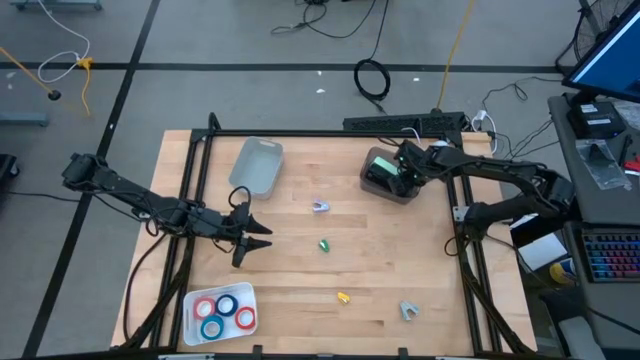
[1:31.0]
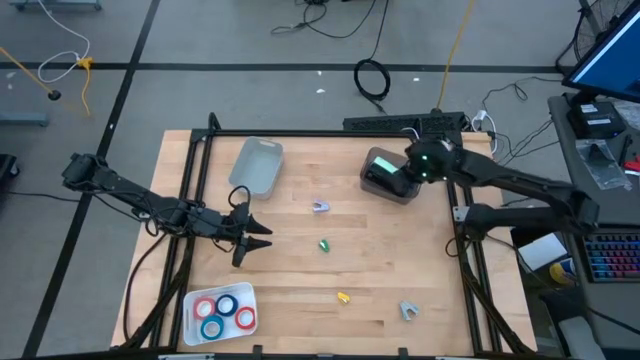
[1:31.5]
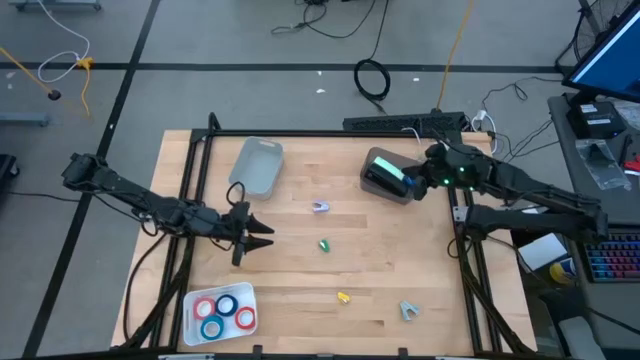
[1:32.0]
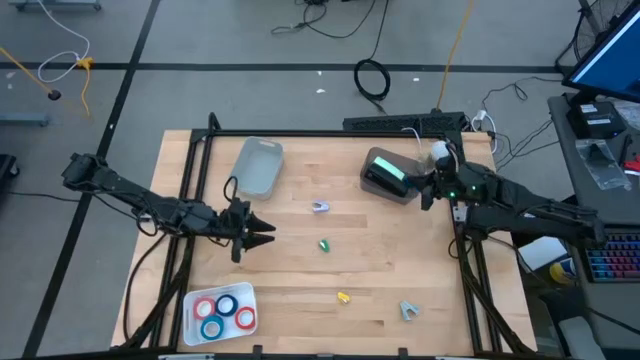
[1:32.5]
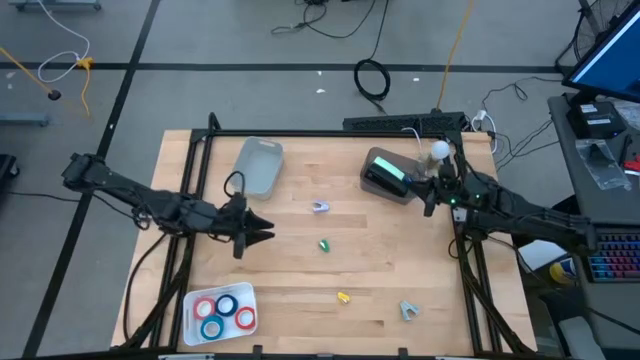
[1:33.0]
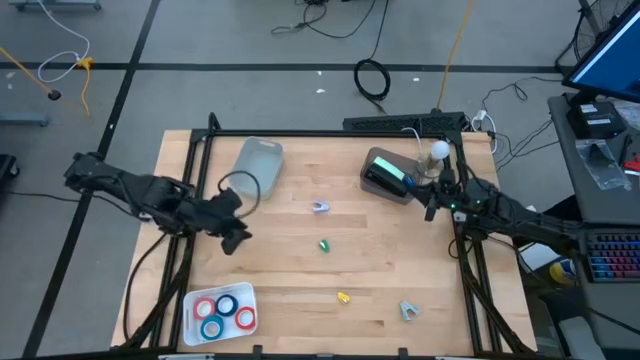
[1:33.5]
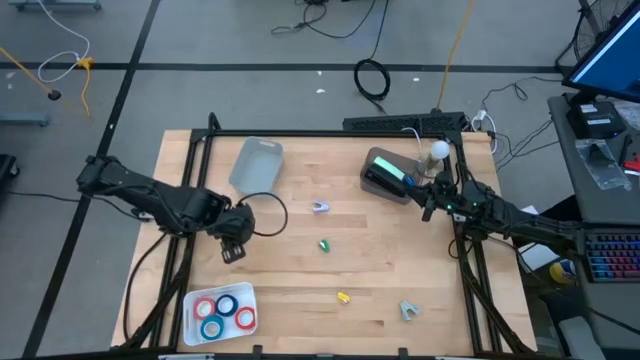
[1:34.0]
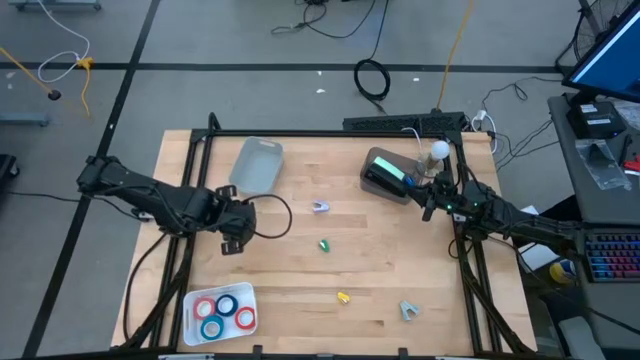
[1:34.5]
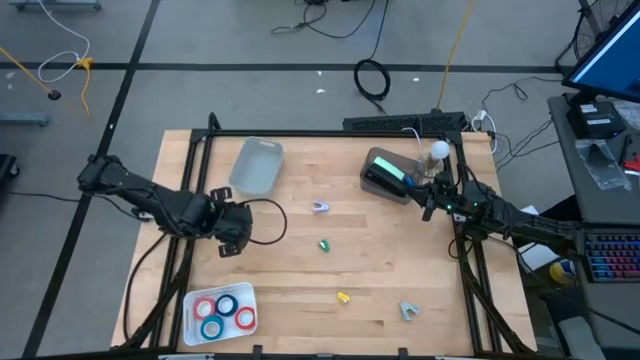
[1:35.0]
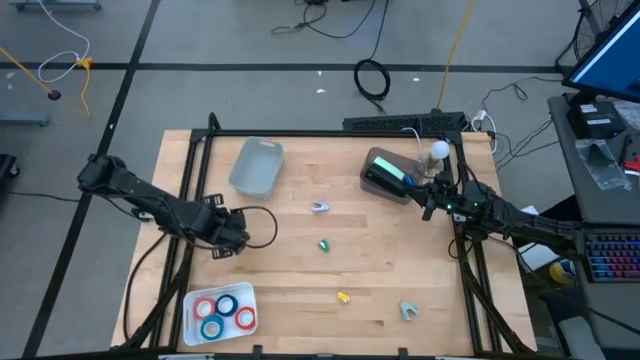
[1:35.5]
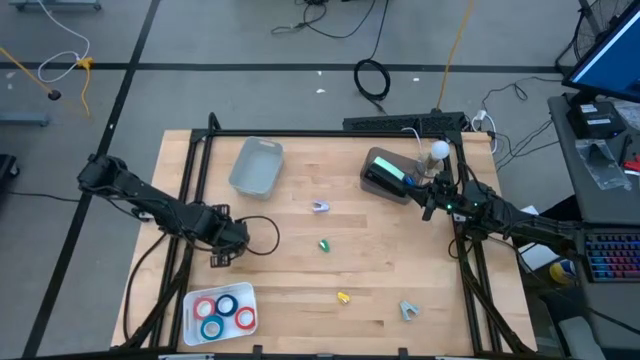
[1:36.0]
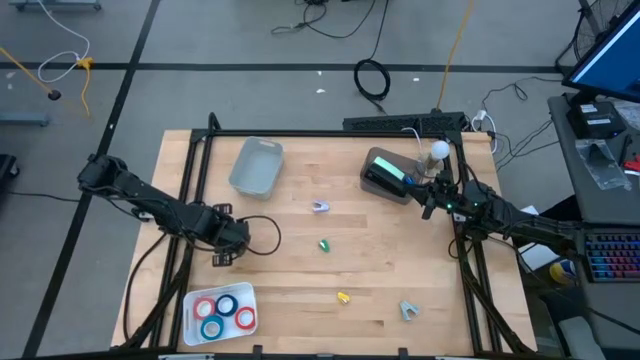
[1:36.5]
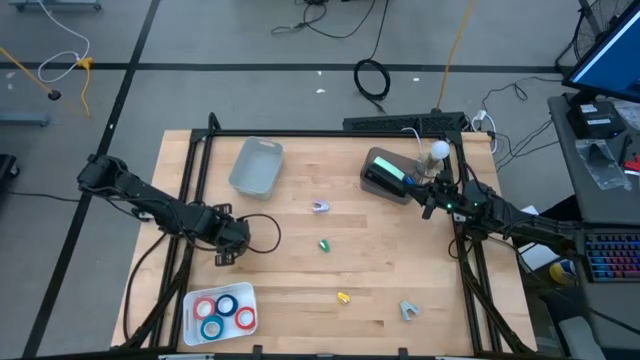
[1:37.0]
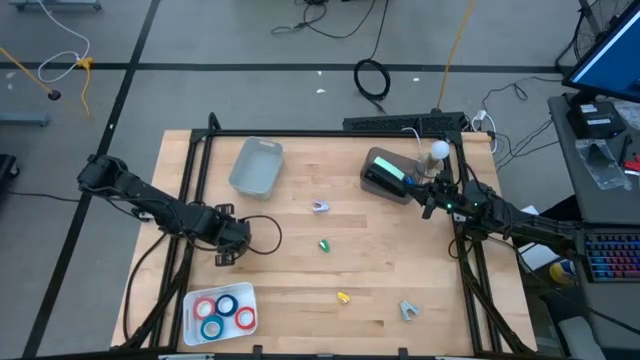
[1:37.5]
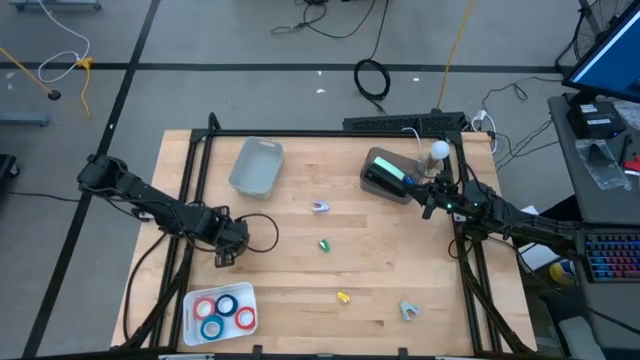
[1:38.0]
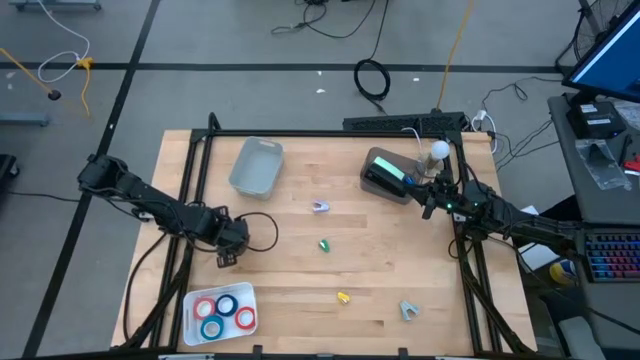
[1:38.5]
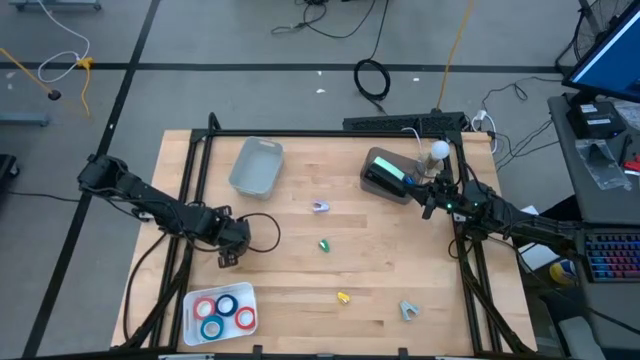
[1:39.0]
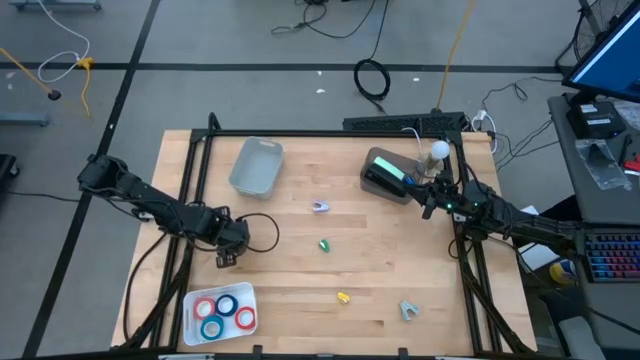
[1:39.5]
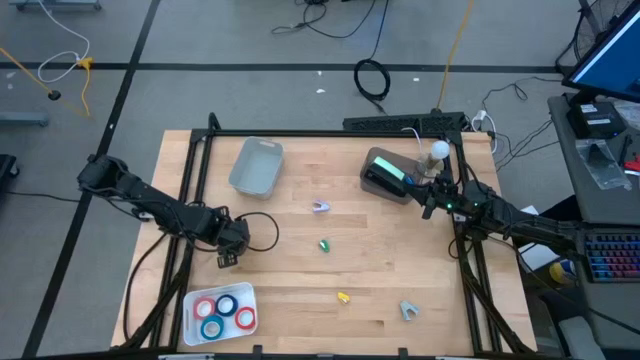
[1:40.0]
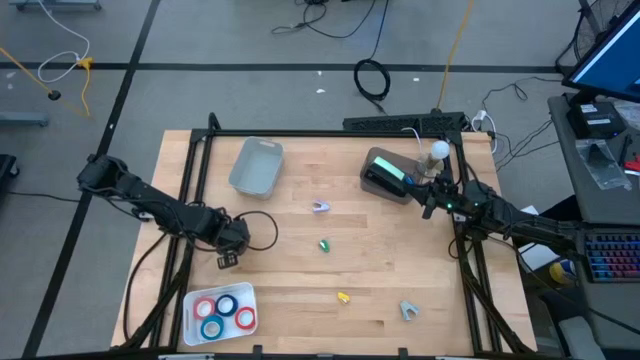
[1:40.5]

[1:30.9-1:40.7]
Task: Pick and place Stapler, Stapler remover, tape
Put the left green small stapler into the black bin

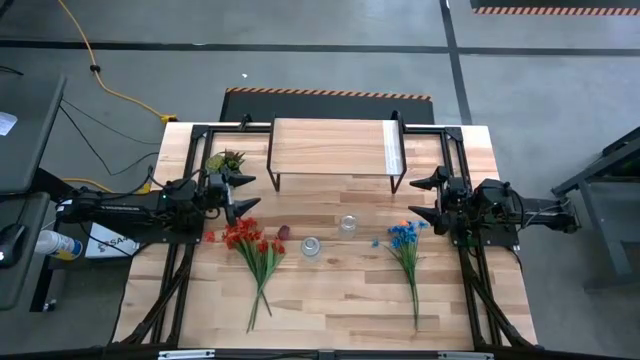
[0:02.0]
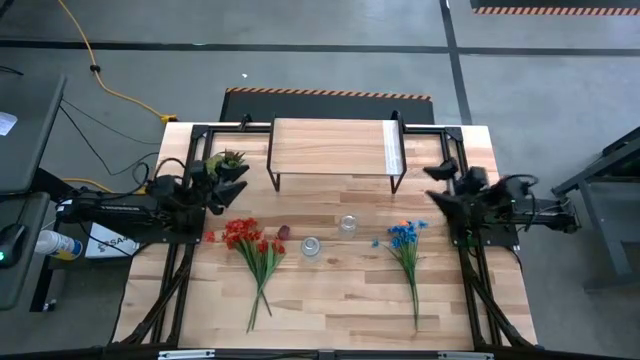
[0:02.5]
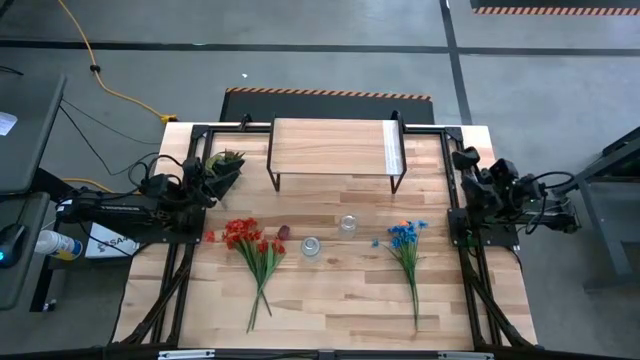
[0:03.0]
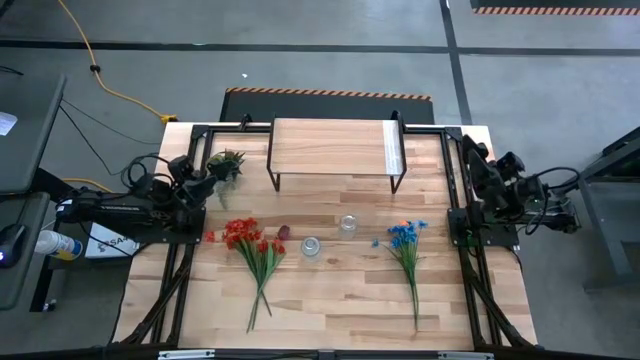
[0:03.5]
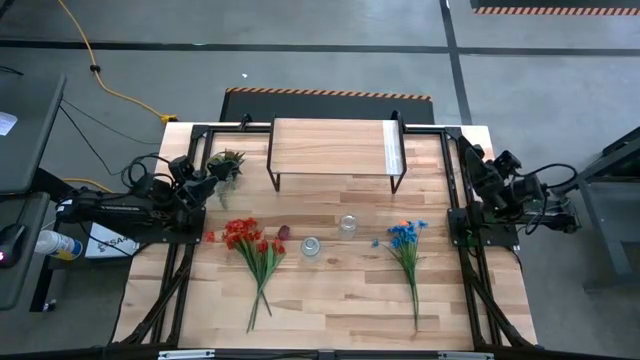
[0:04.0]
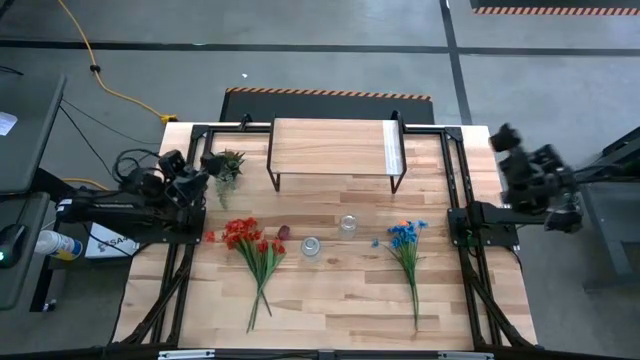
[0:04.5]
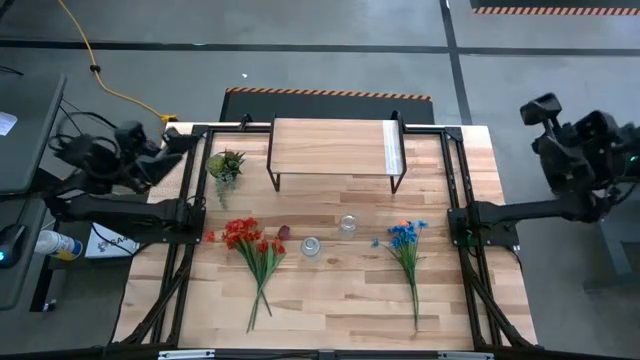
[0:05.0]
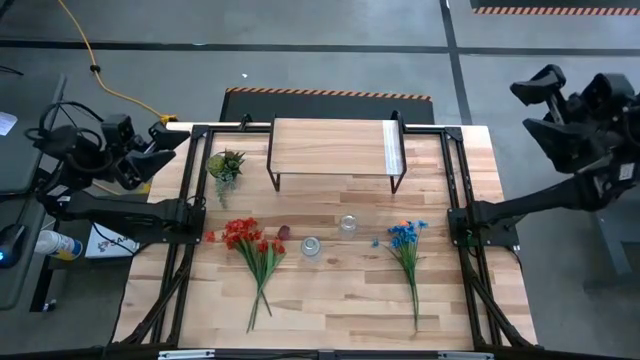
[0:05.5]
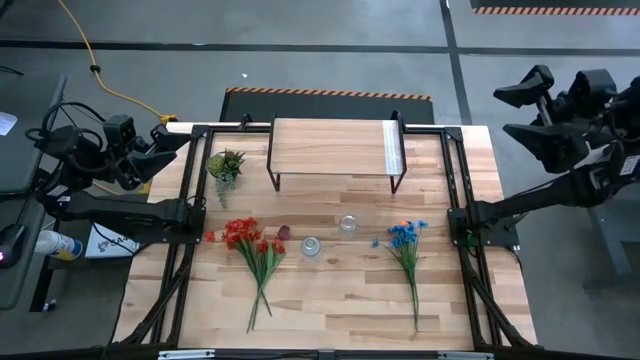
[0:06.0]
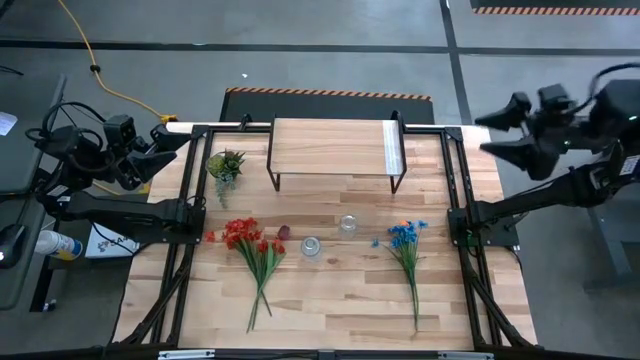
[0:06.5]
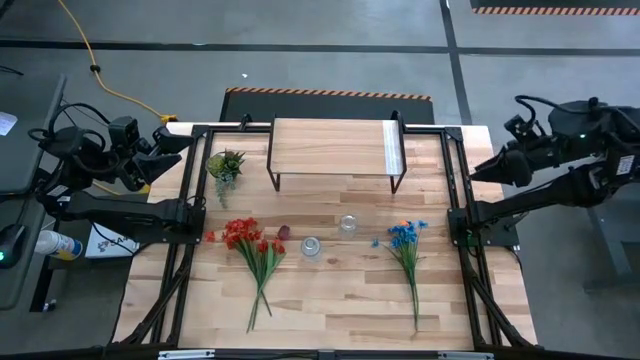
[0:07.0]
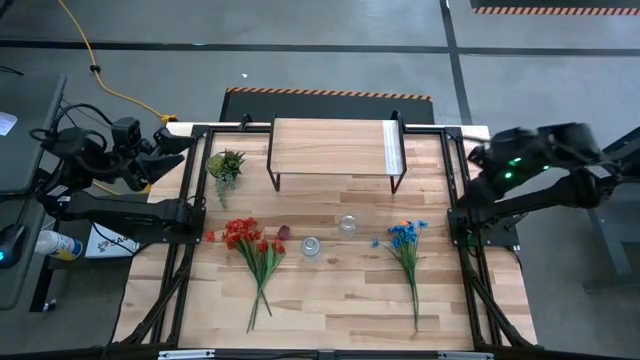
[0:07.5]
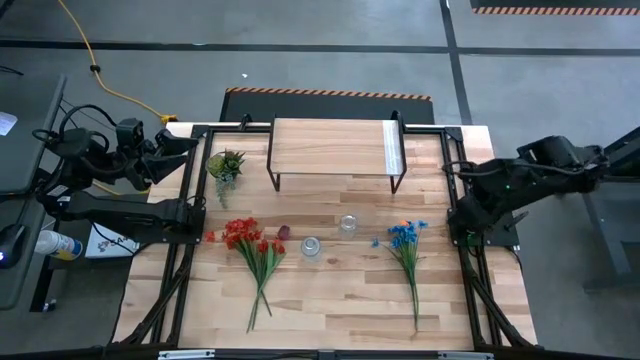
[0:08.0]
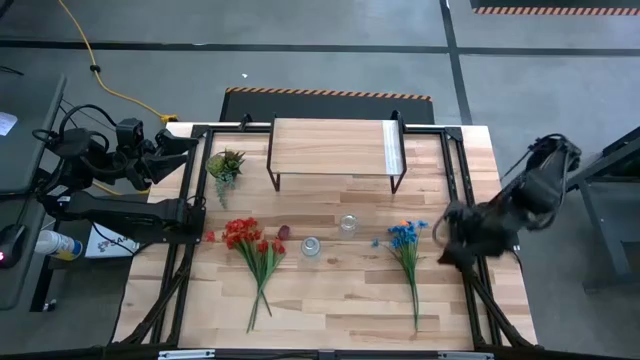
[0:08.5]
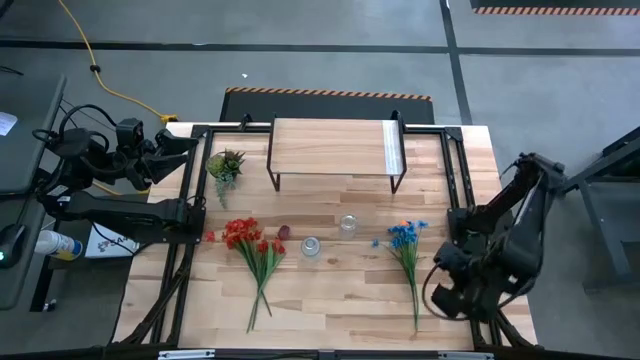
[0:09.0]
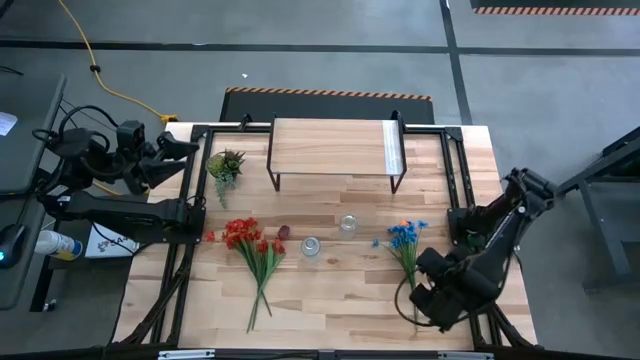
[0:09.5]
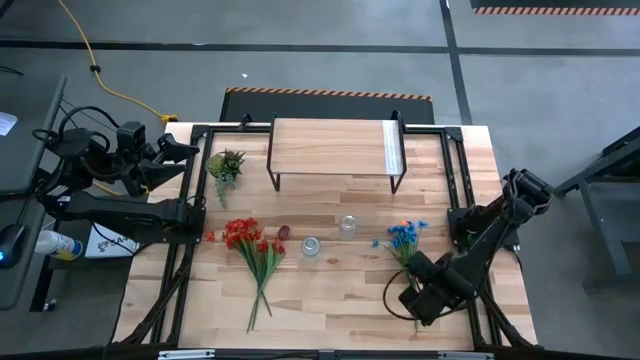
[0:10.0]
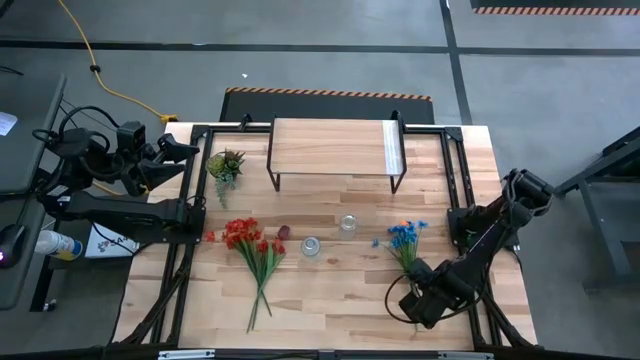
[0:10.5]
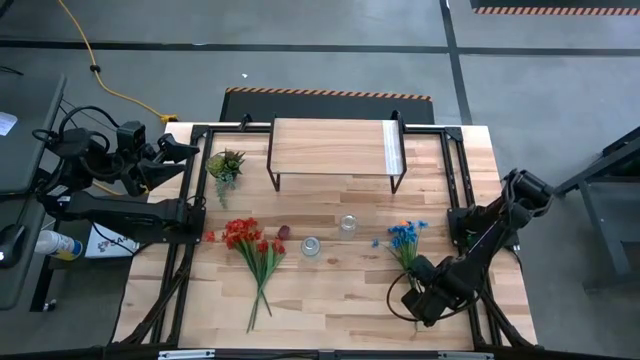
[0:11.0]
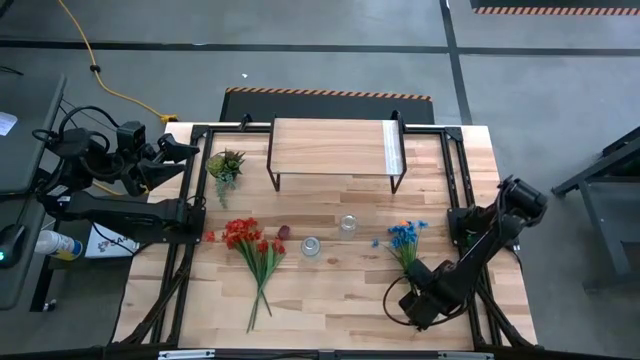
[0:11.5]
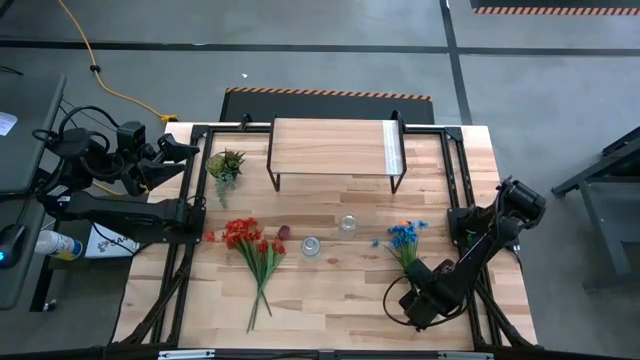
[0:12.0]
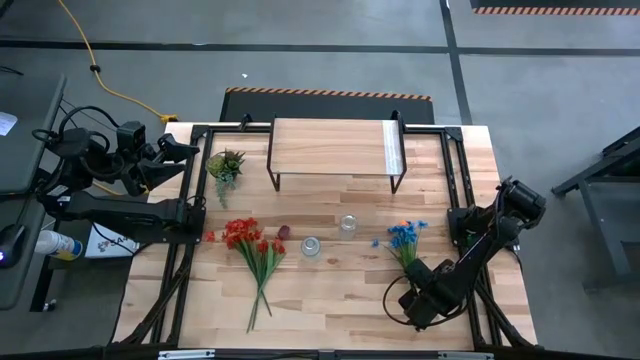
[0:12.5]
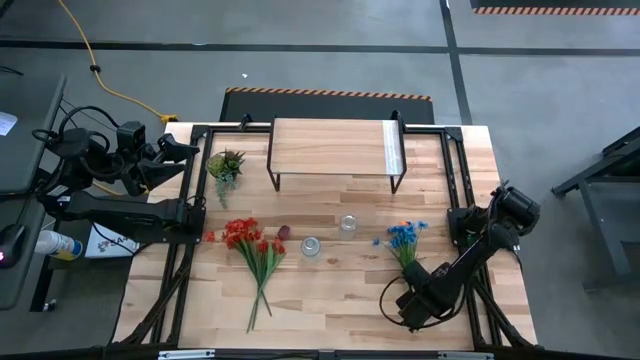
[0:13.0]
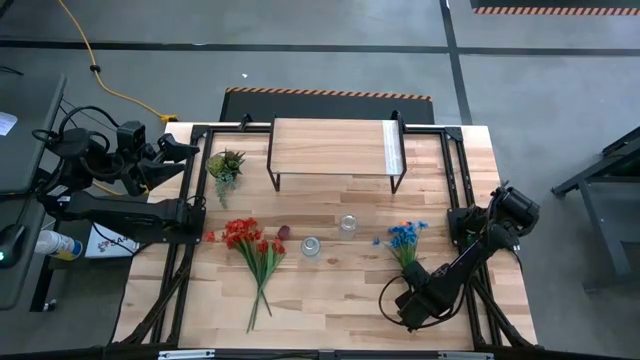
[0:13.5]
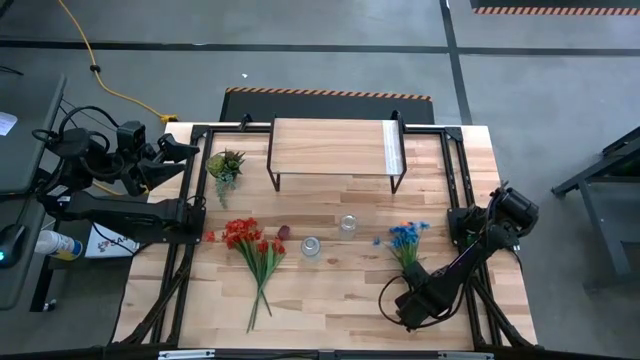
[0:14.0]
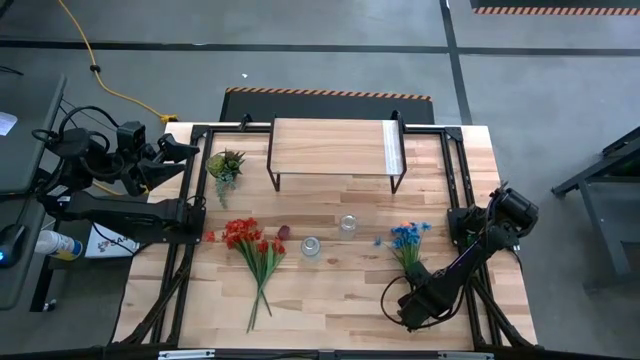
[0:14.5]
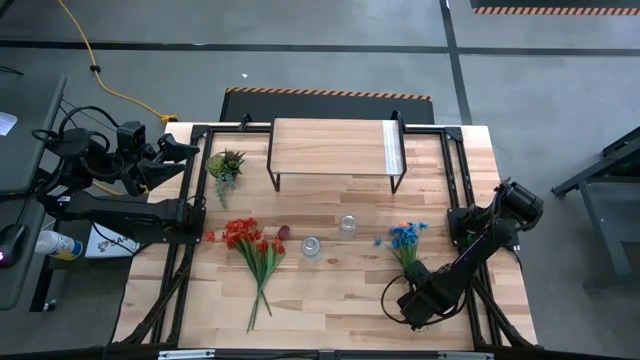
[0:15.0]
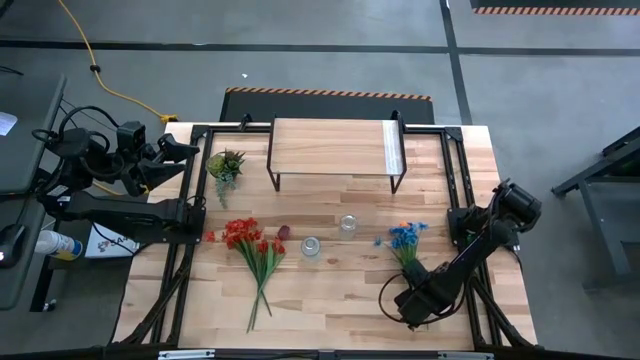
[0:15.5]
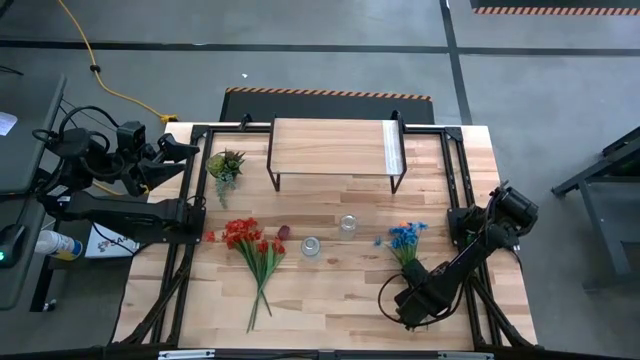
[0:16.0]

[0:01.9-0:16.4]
Task: Pick and place flowers into a vace then onto a shelf
Put the orange flower into the top transparent vase
